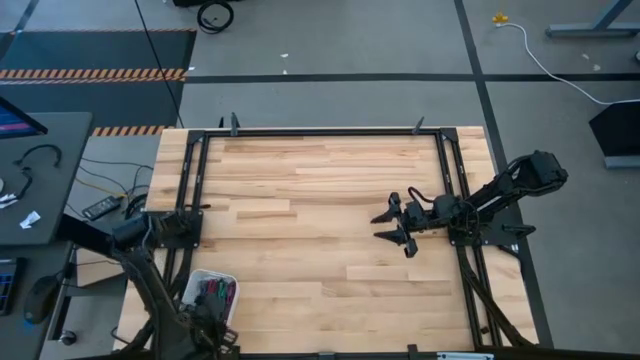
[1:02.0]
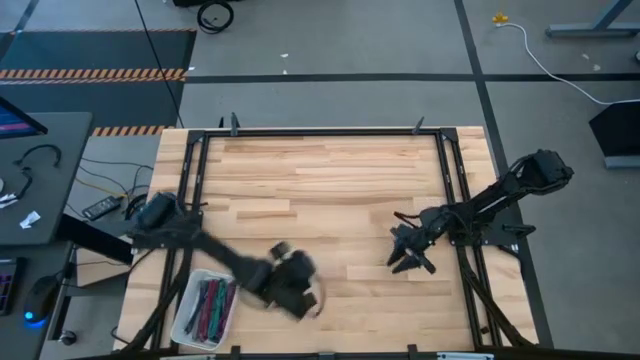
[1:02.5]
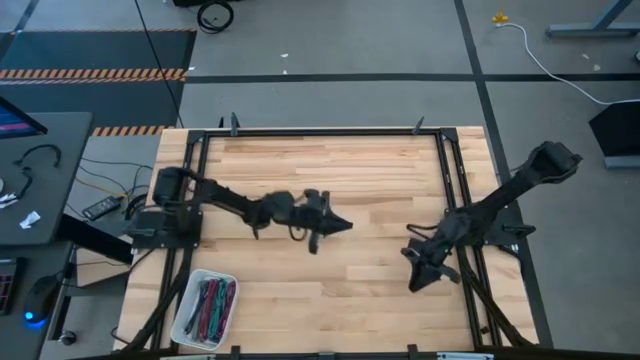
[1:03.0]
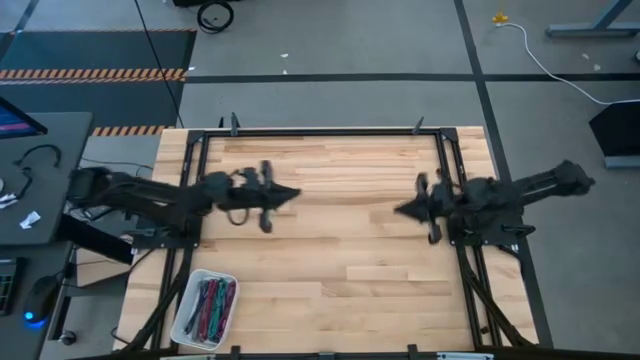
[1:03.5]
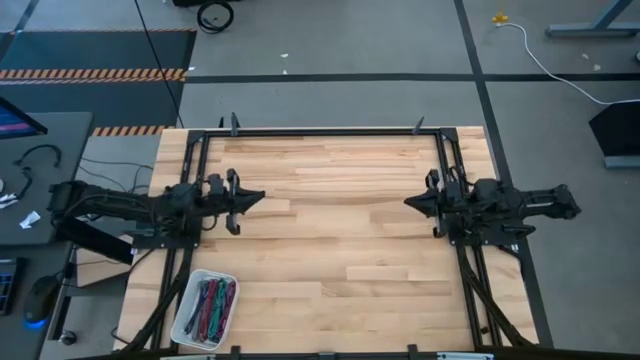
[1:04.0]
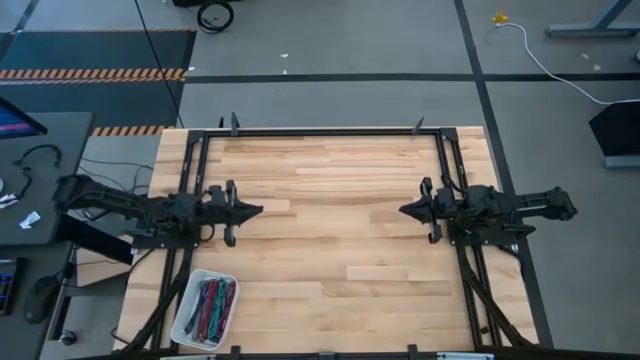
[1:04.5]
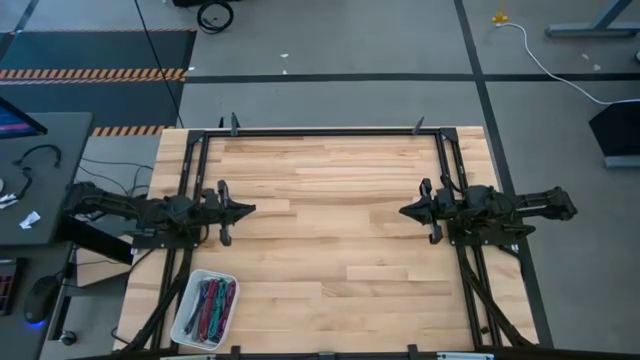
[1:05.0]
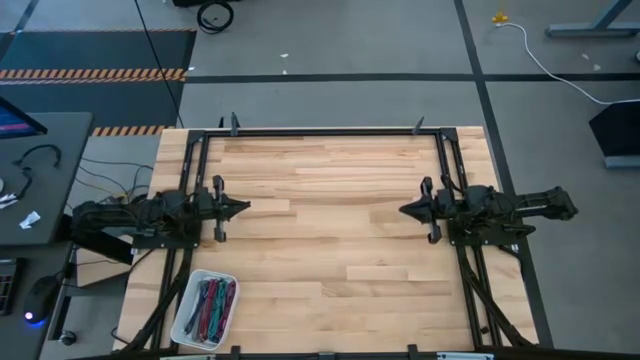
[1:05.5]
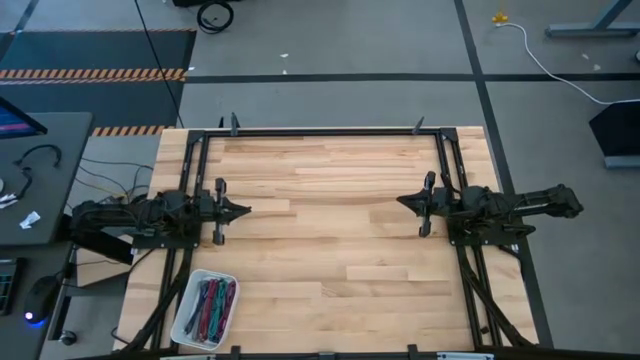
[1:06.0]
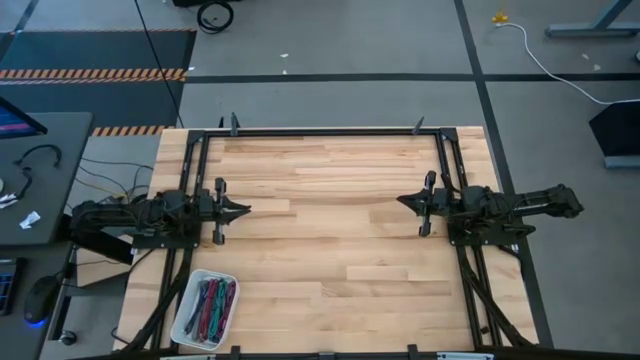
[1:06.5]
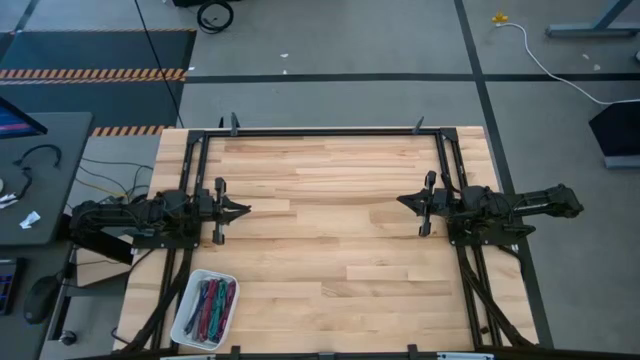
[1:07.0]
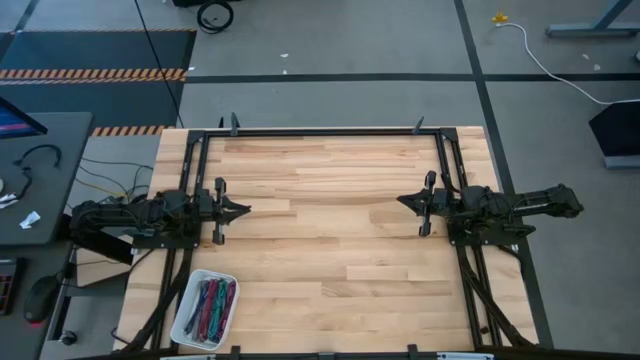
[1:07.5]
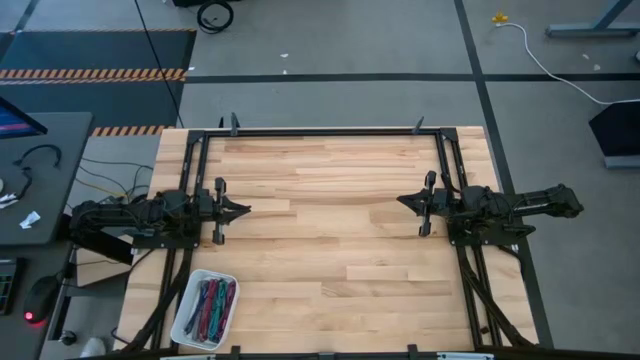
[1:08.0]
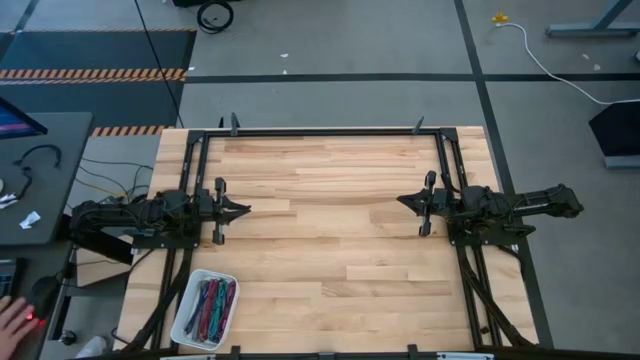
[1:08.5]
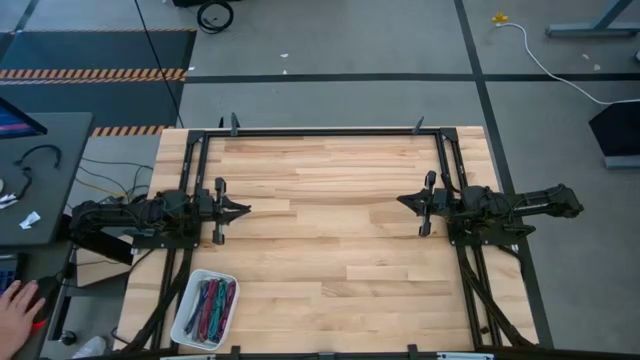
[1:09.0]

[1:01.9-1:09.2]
Task: Pick and place USB-C Cables
Return to Home Position

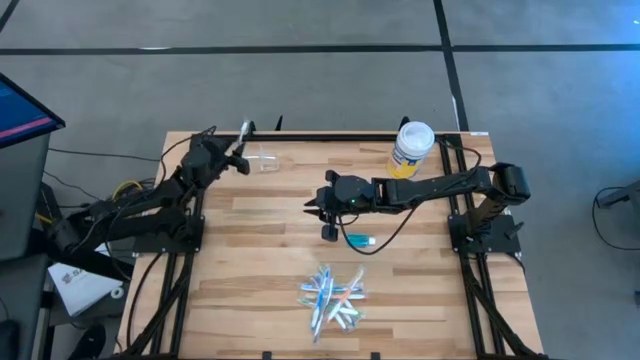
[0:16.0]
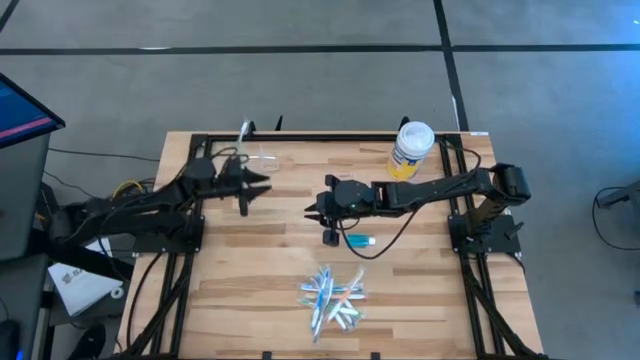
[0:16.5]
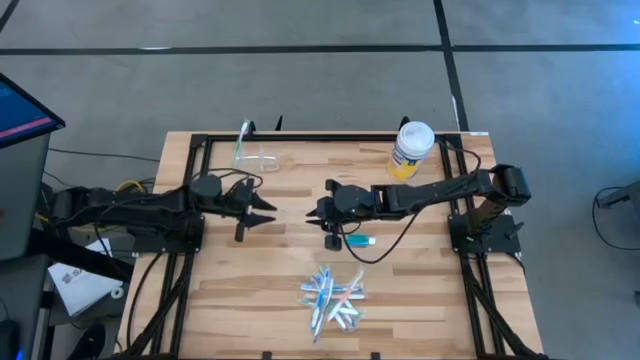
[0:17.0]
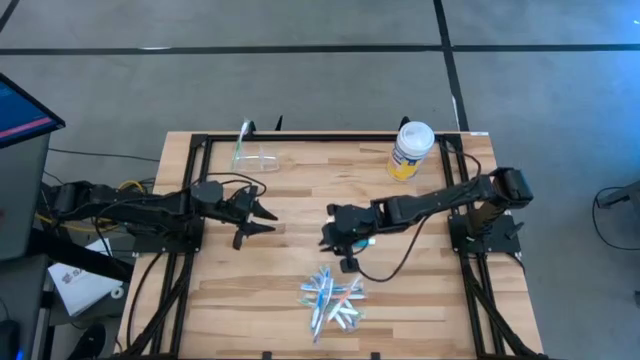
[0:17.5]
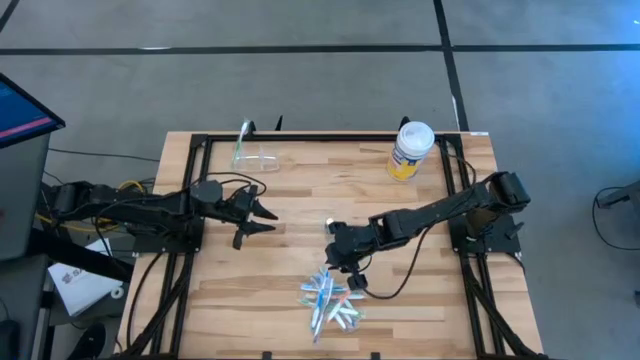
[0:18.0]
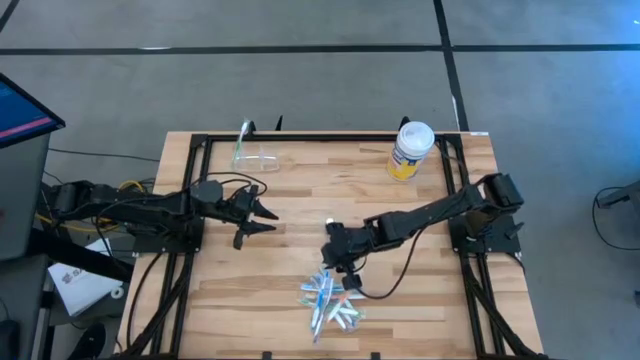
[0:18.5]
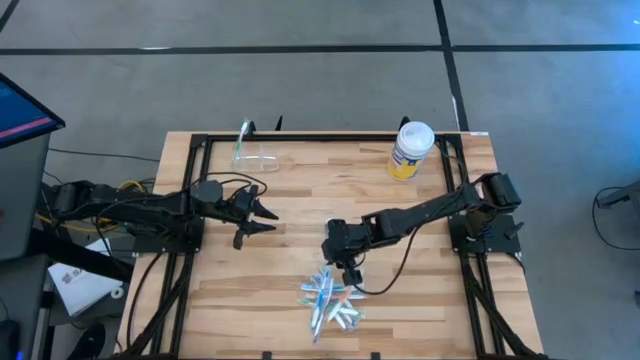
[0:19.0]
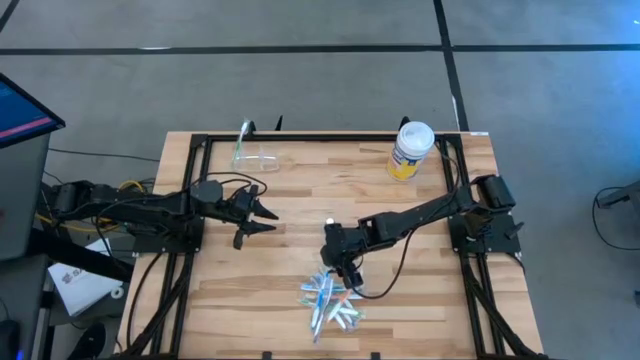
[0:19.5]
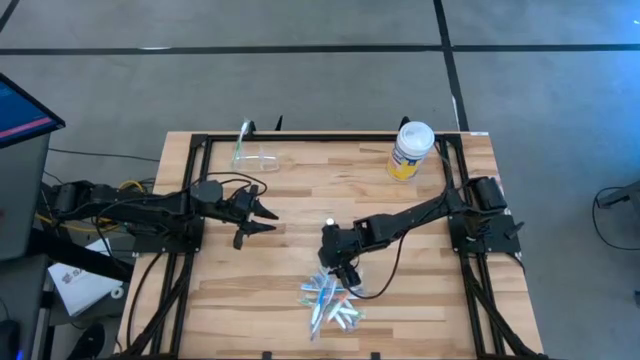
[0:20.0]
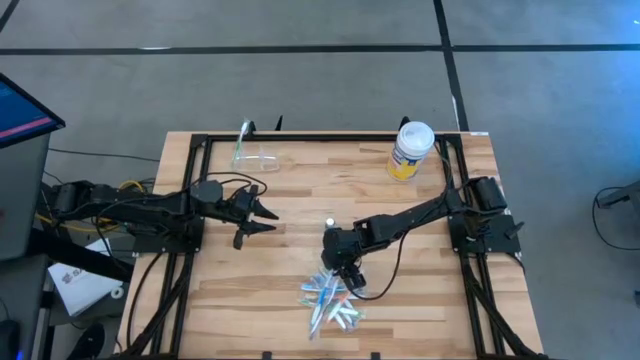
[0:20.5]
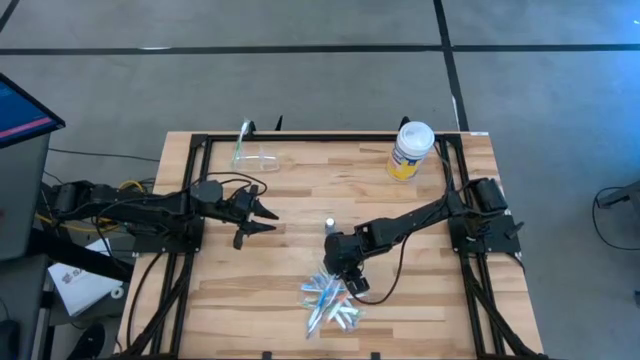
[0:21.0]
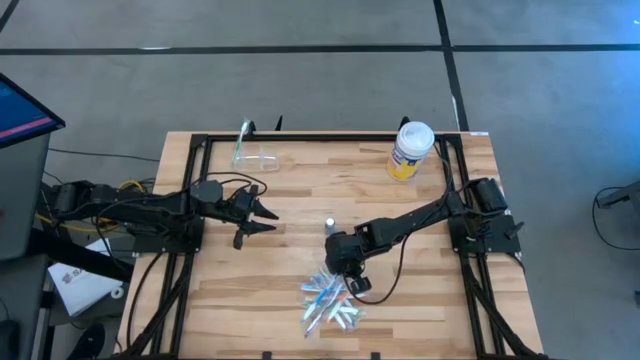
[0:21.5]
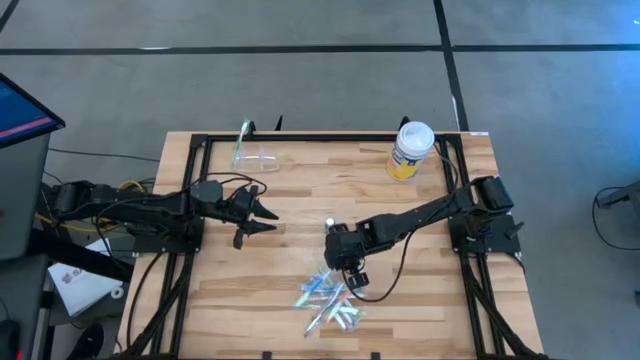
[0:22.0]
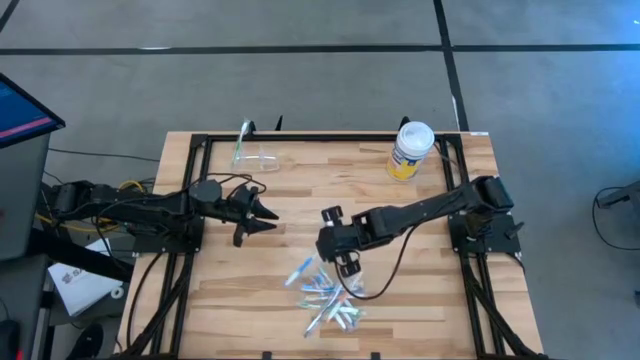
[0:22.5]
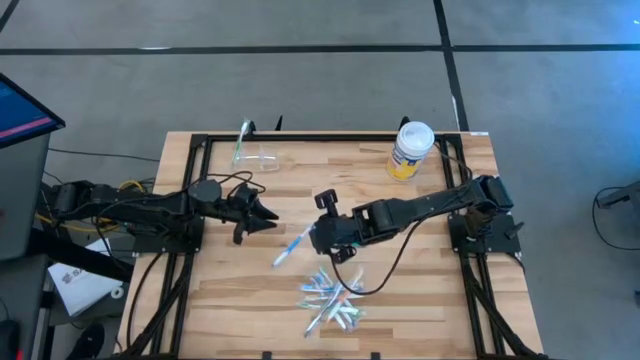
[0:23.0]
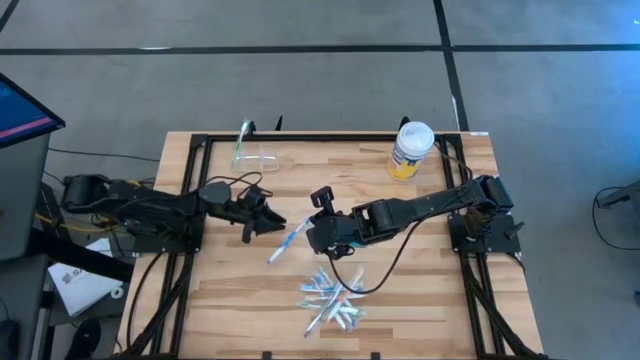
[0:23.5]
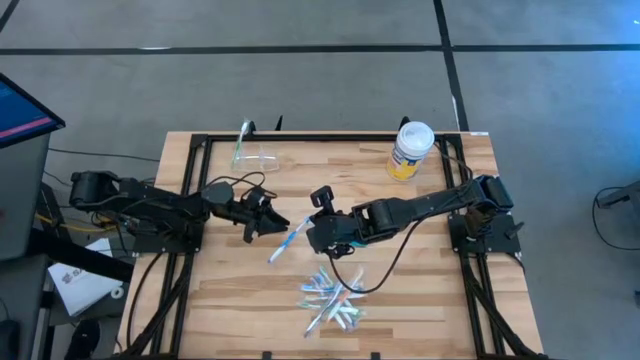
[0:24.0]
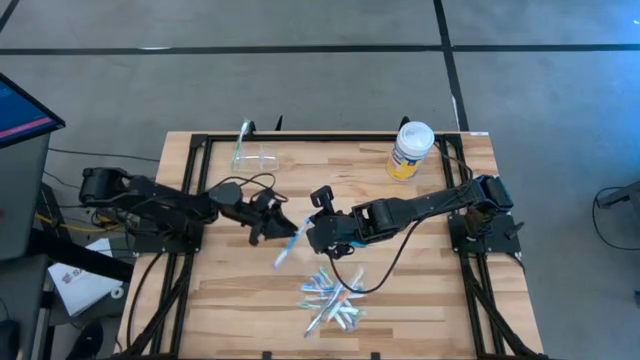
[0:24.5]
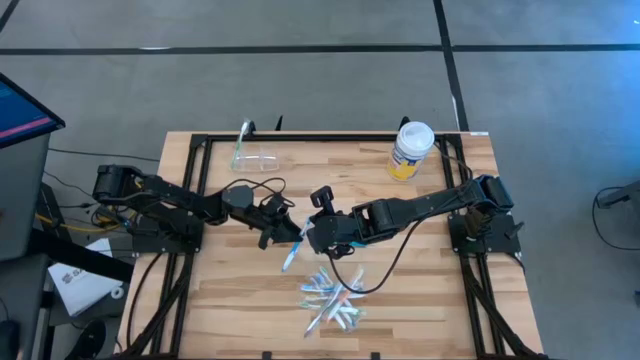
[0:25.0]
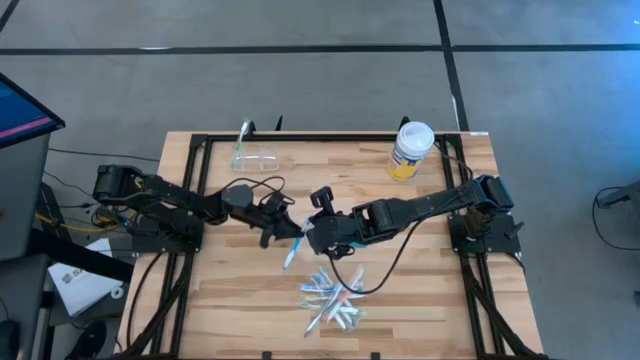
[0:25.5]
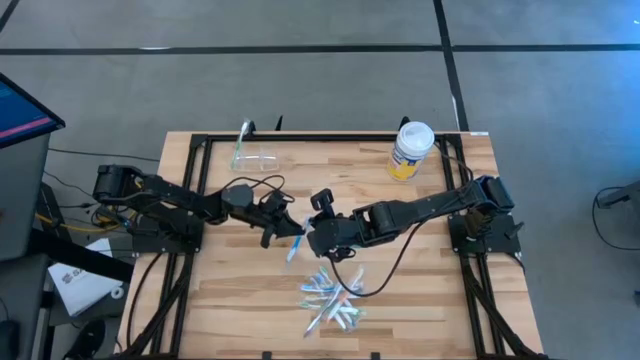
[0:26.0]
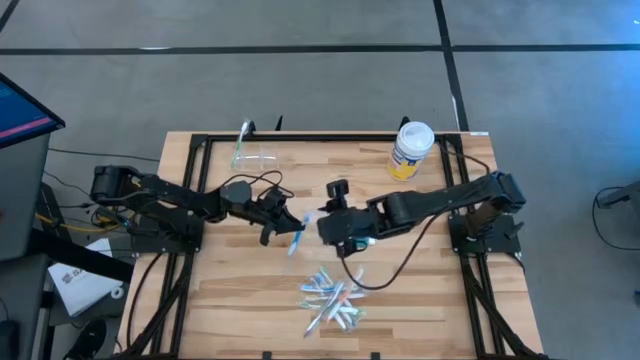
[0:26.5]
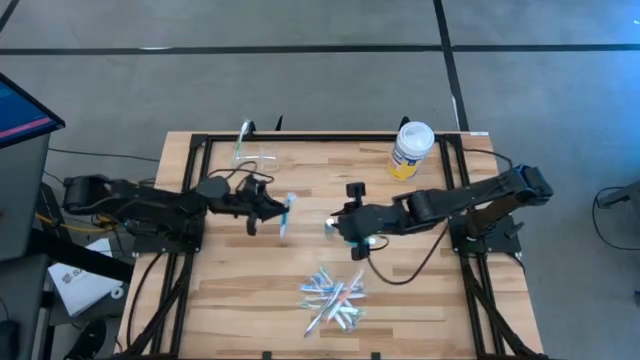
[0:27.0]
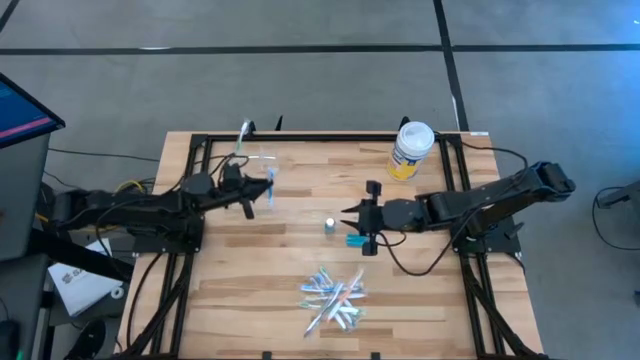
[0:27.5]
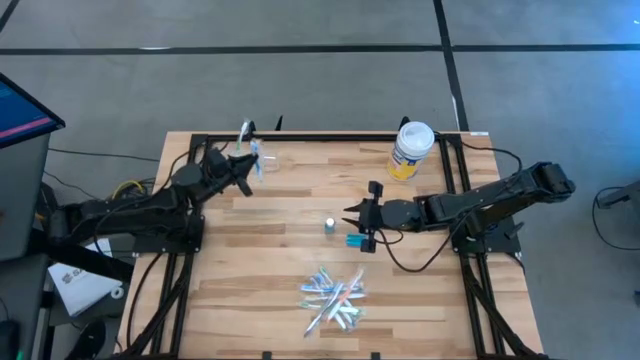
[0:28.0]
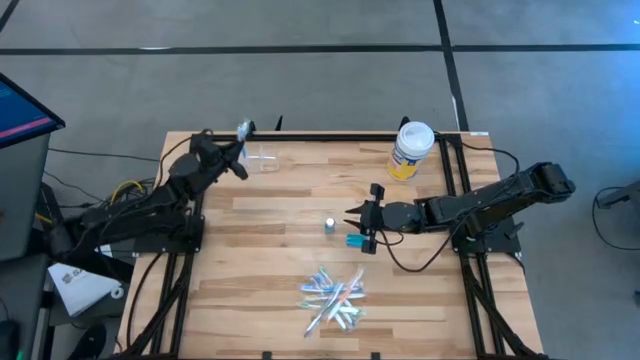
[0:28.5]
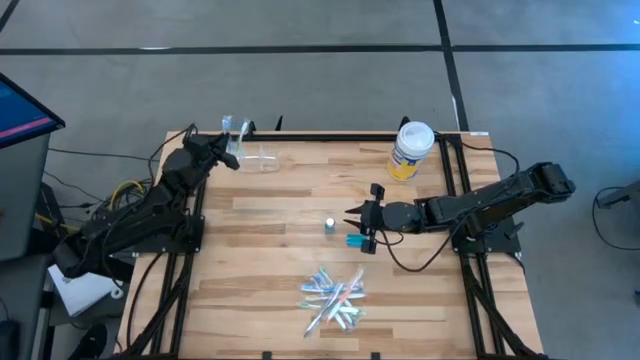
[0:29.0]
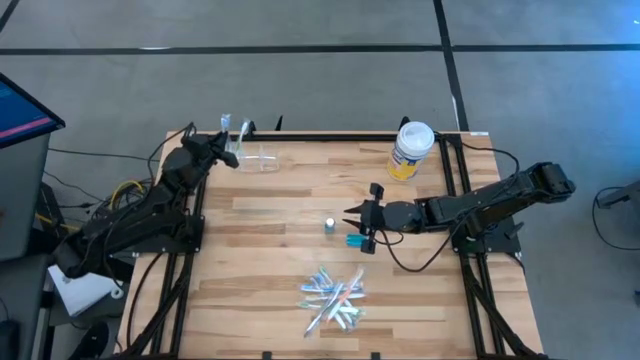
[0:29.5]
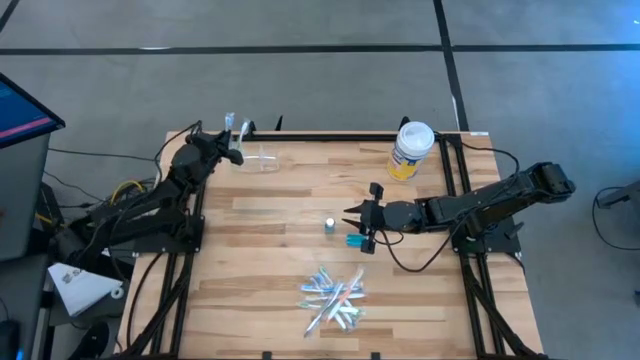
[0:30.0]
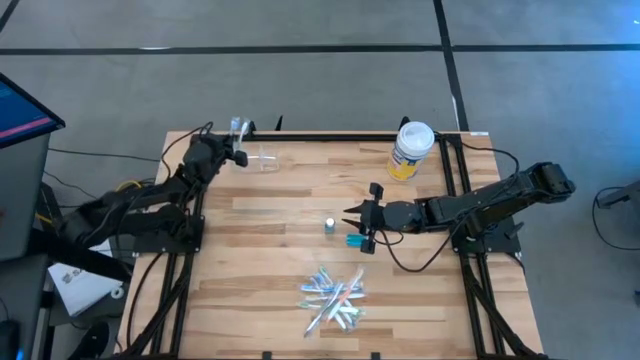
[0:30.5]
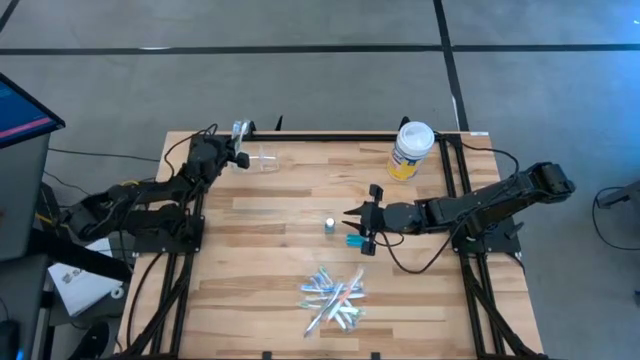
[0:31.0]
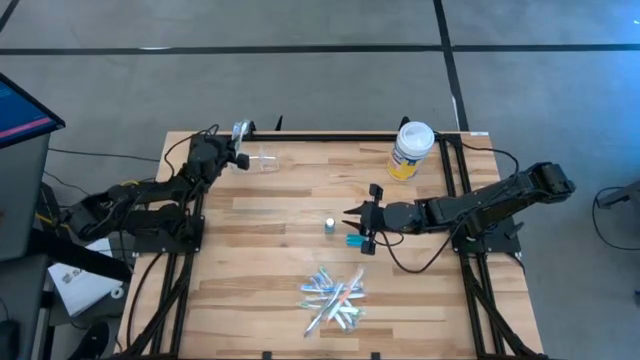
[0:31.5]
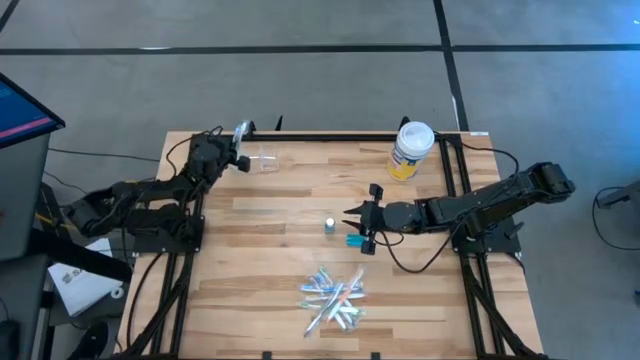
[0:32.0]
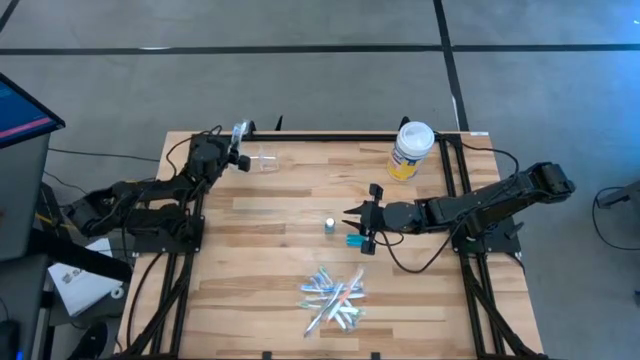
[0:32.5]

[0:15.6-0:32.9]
Task: Pick & Place toothbrushing station
Put the blue toothbrush into the transparent organizer
